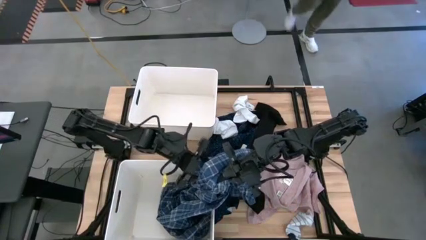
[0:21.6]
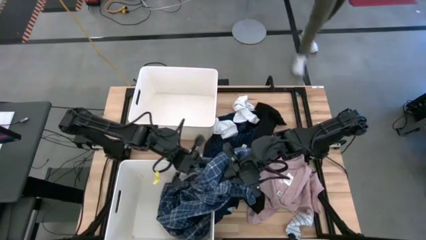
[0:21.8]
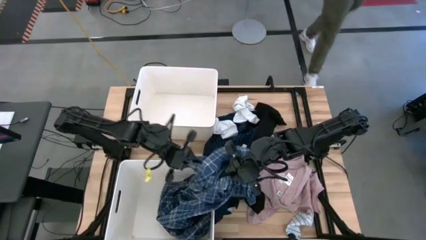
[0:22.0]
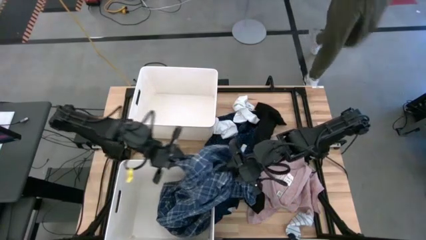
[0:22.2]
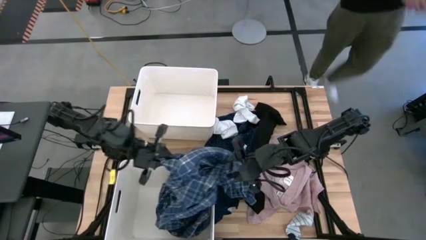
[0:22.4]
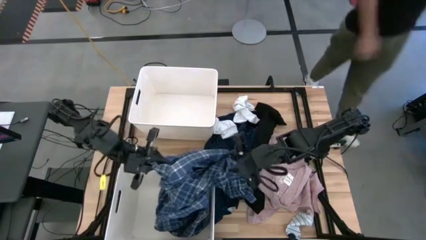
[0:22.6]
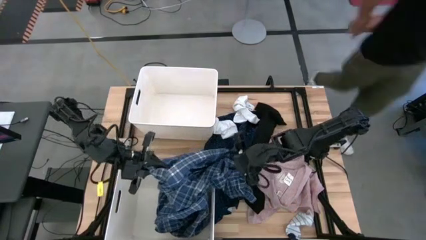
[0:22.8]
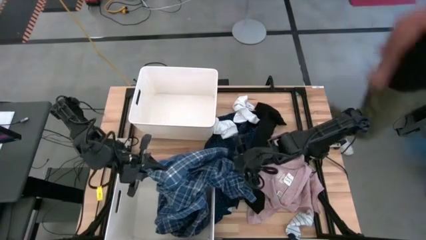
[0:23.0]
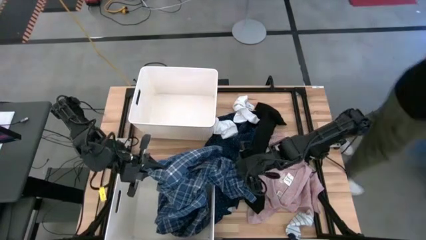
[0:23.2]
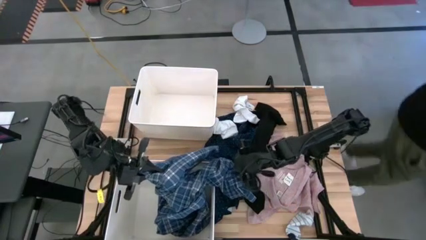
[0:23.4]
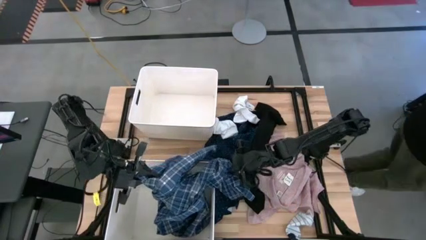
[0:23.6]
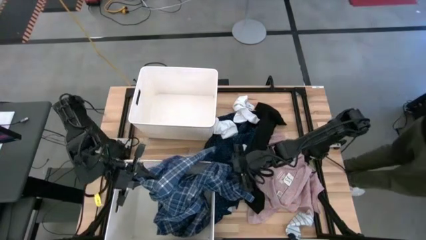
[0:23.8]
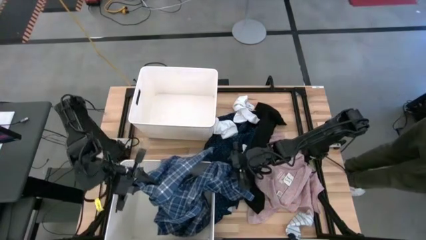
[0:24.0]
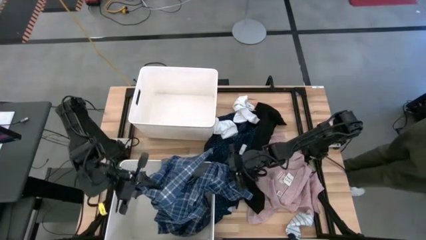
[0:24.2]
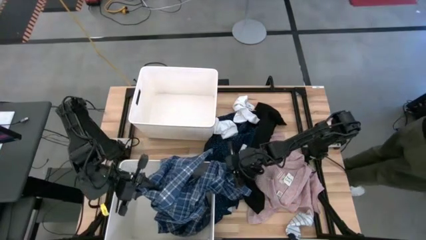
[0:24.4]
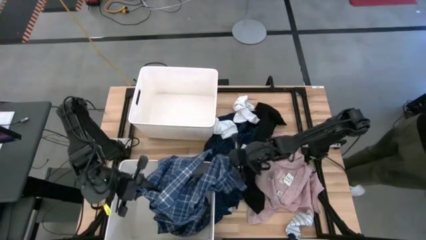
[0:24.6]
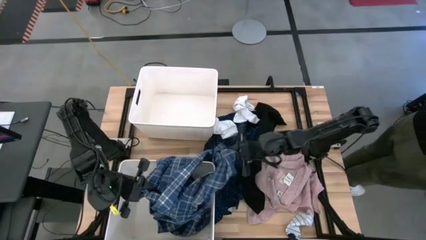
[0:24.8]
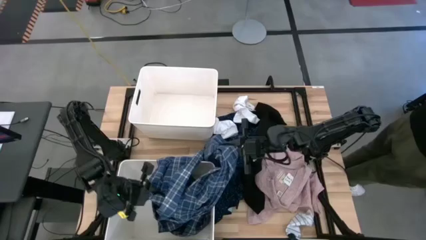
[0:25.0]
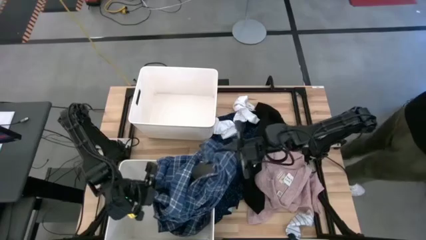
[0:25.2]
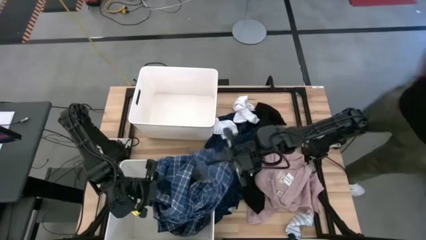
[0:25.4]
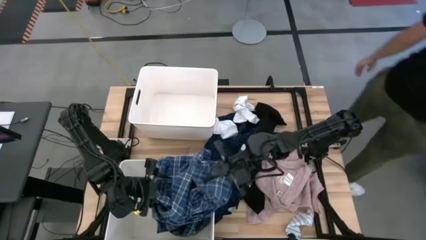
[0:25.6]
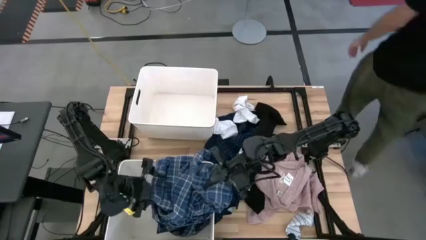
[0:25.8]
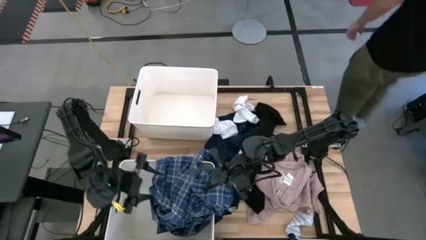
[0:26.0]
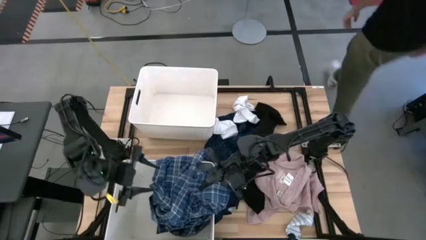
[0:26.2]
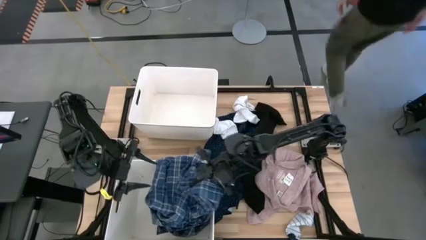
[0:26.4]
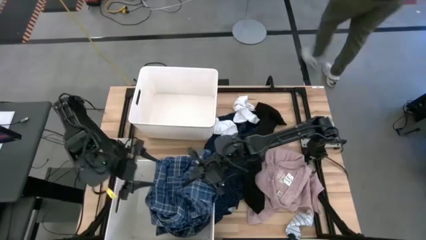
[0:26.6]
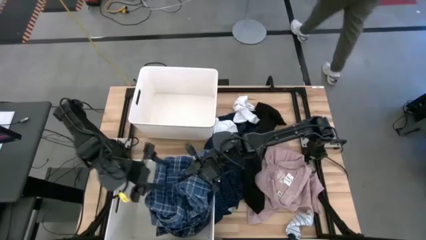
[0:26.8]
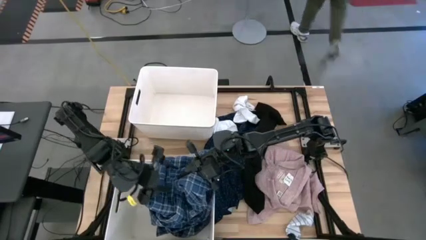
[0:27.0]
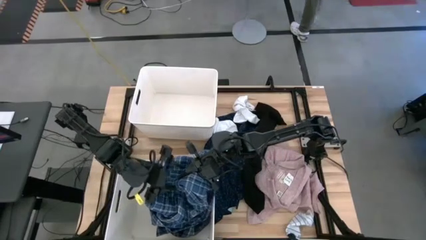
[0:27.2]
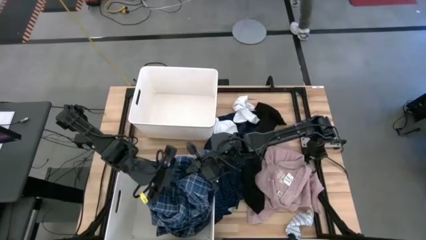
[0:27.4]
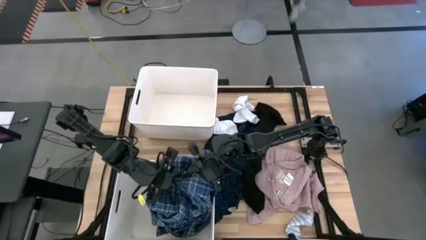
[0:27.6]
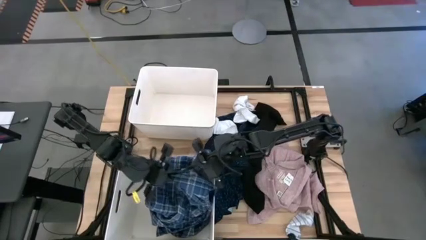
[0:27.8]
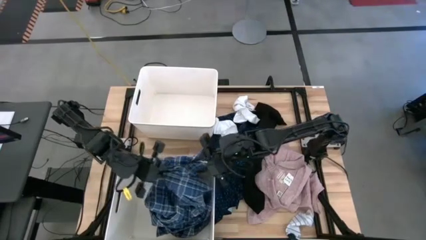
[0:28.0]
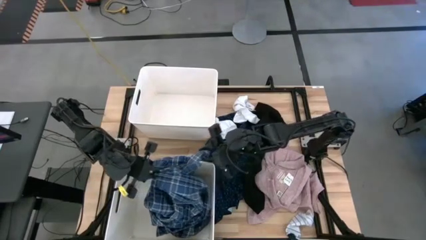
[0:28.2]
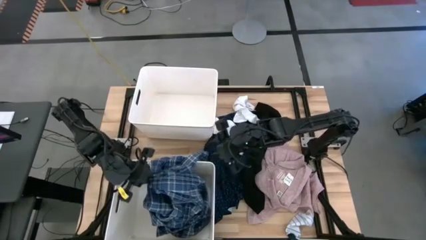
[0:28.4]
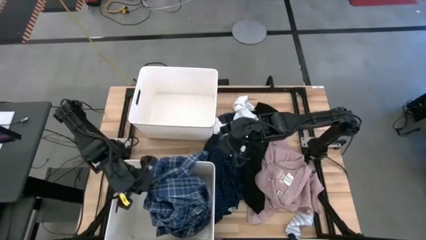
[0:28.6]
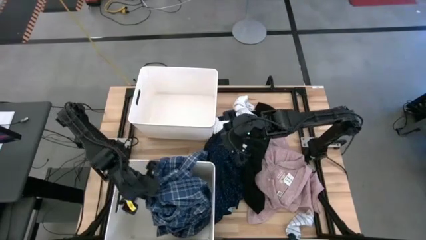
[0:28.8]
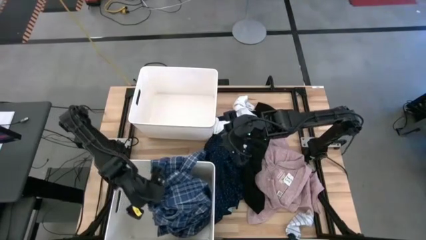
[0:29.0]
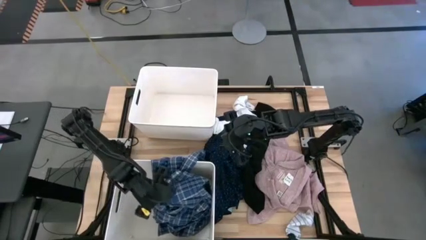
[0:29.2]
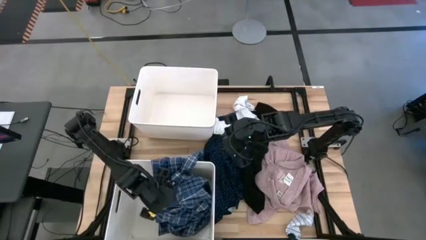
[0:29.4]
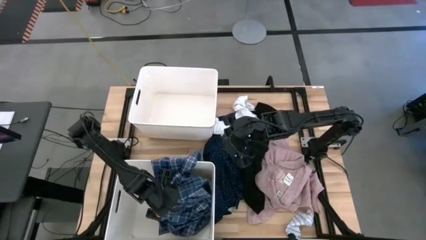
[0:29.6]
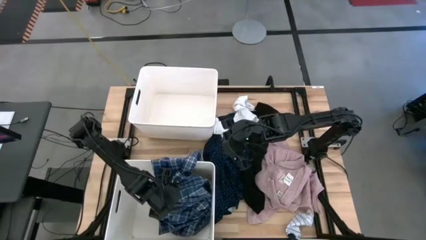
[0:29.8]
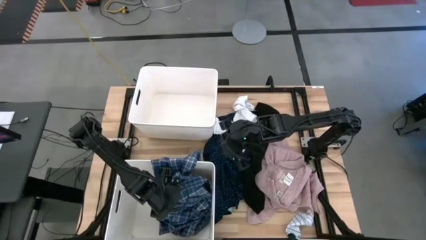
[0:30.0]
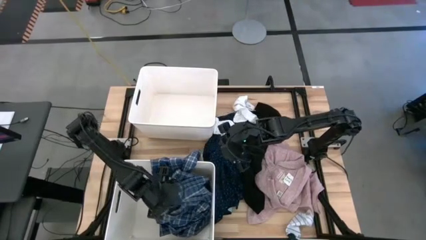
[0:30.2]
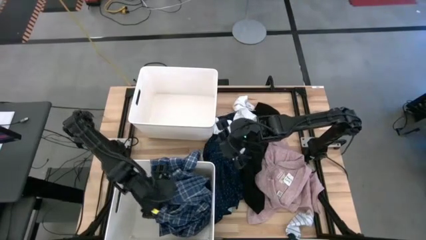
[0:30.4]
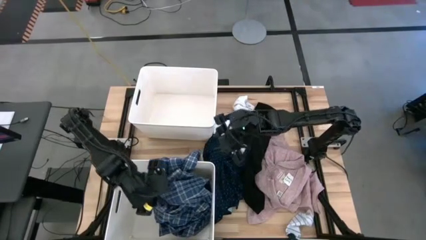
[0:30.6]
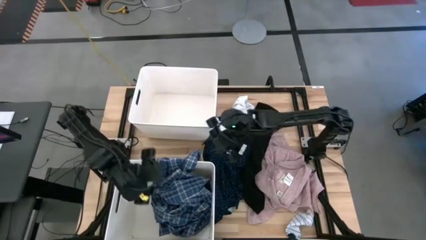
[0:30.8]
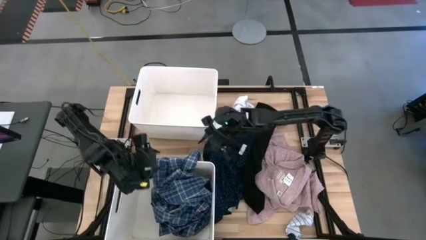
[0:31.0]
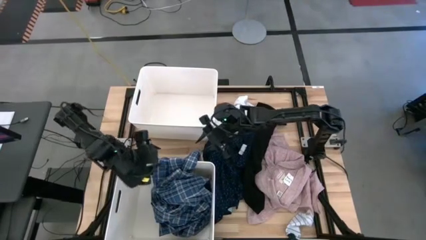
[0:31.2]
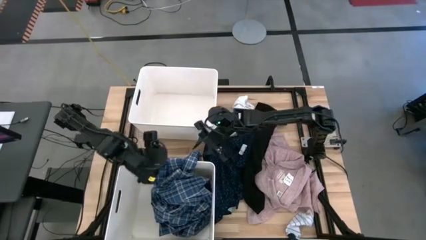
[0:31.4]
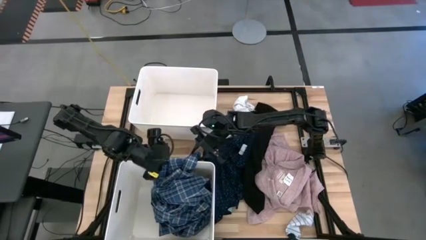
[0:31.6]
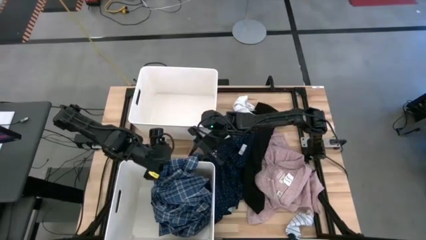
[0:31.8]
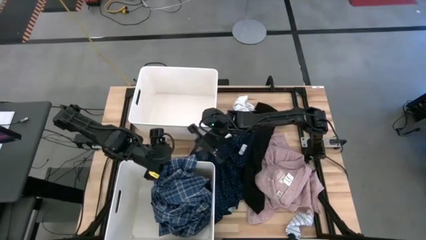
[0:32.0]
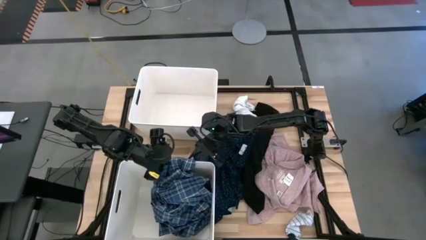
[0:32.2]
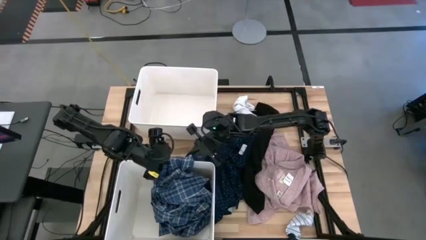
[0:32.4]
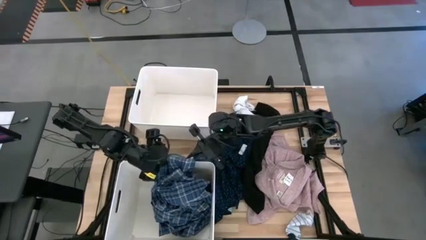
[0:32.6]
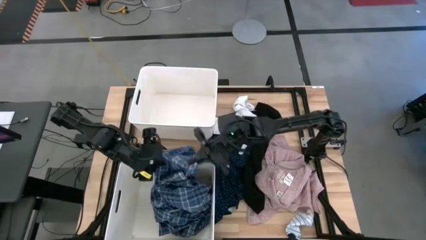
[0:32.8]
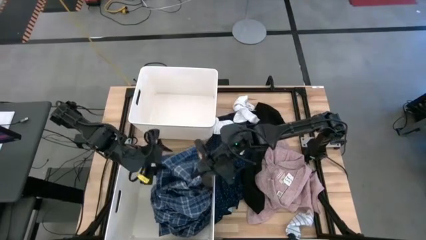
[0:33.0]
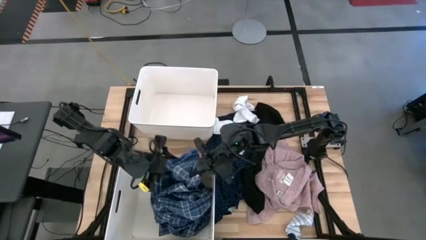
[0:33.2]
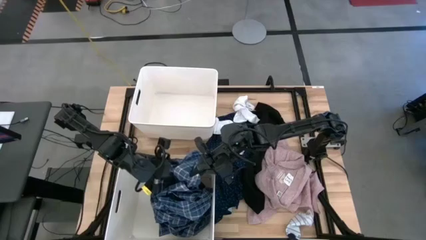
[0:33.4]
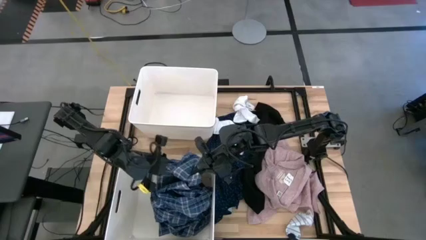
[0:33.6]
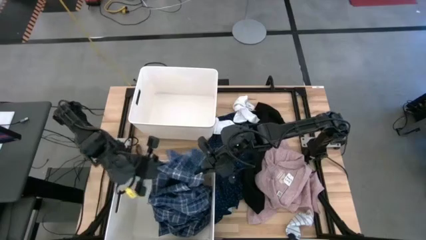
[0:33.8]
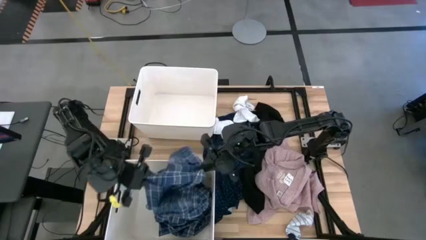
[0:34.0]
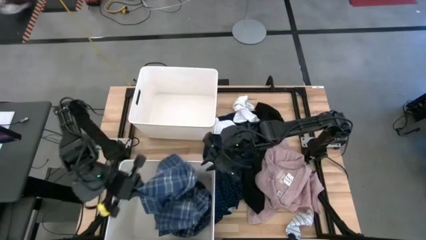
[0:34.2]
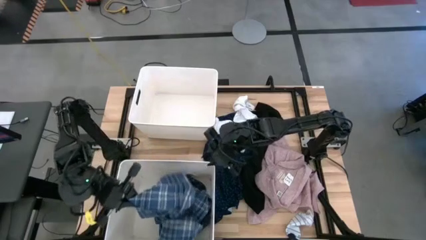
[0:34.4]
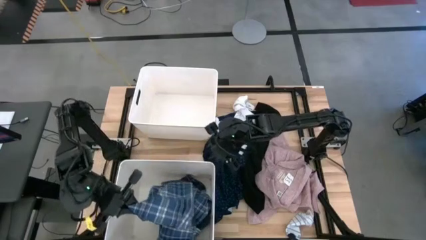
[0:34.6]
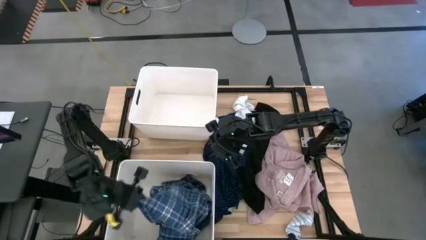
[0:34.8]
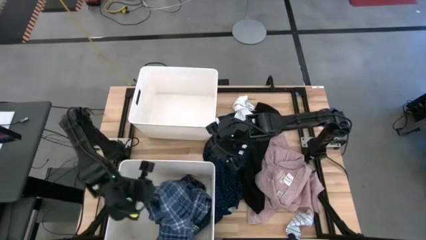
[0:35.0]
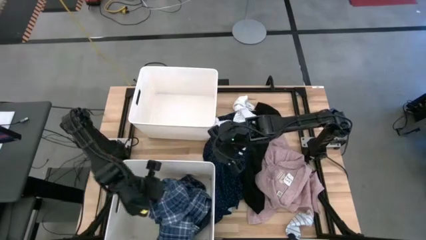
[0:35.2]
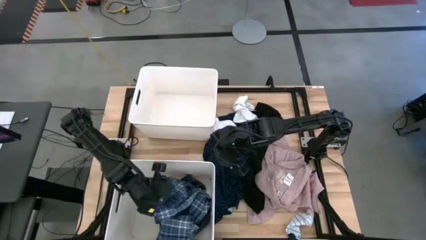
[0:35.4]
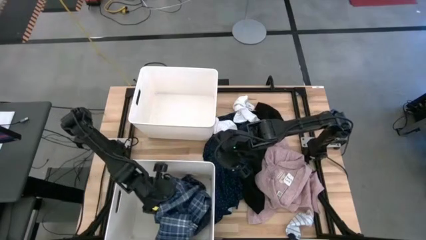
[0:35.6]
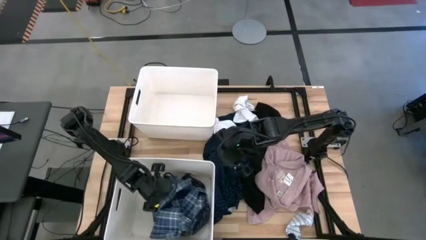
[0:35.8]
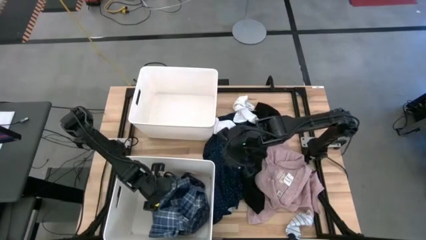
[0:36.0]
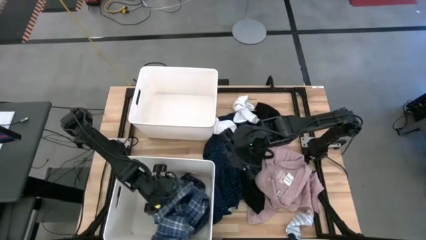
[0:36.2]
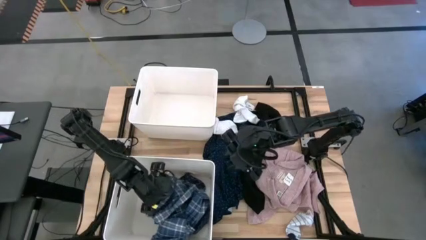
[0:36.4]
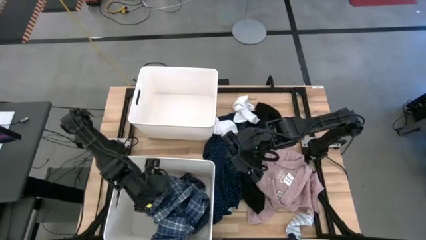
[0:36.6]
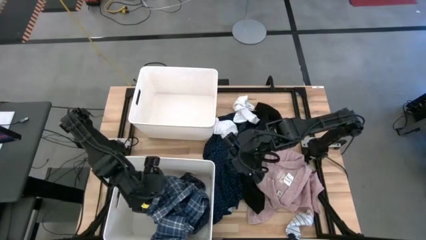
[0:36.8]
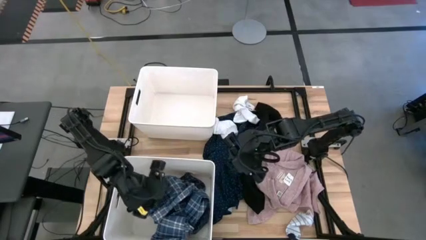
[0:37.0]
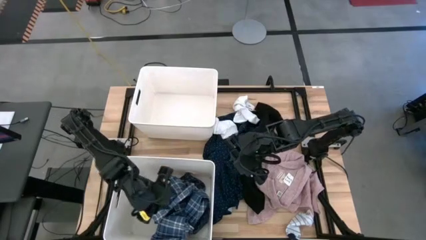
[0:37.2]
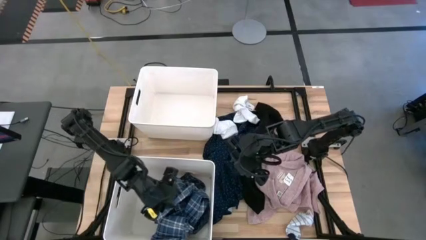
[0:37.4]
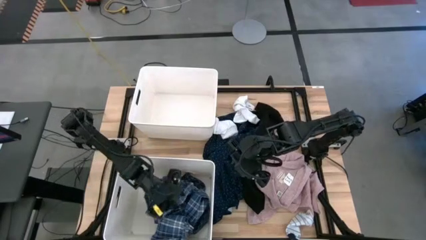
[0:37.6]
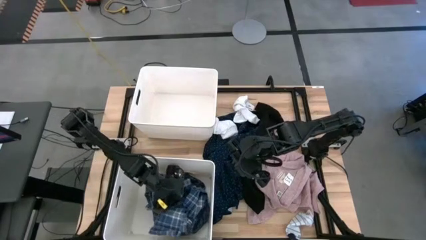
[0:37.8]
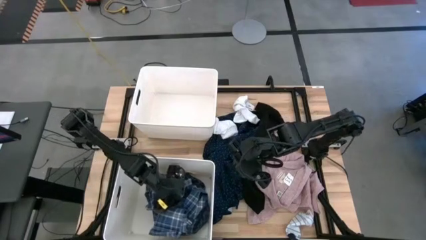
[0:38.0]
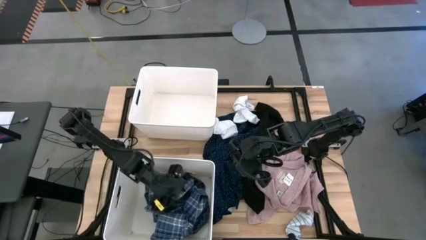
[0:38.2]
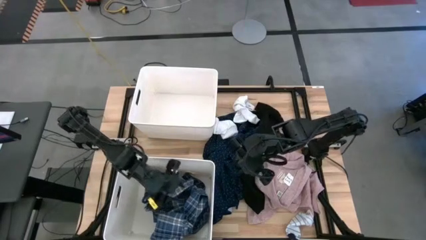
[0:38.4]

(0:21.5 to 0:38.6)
Task: Sort clothes
Put the blue pants into the bottom white laundry organizer
